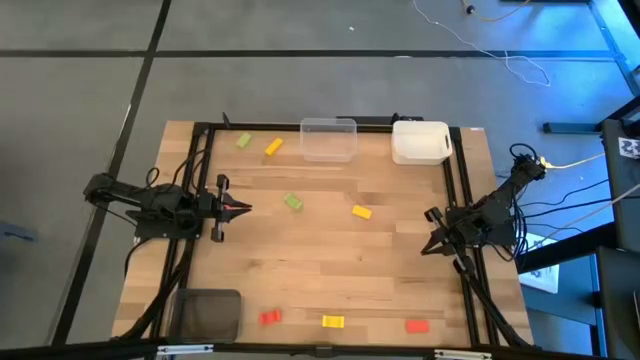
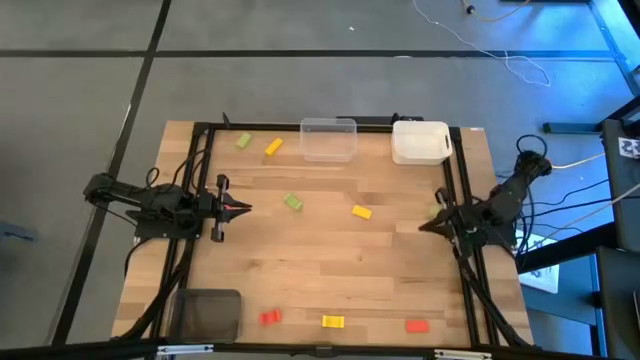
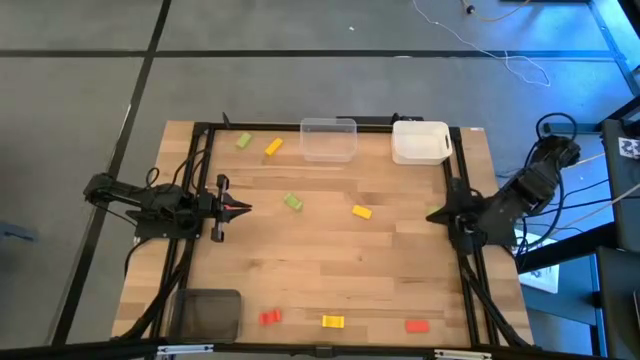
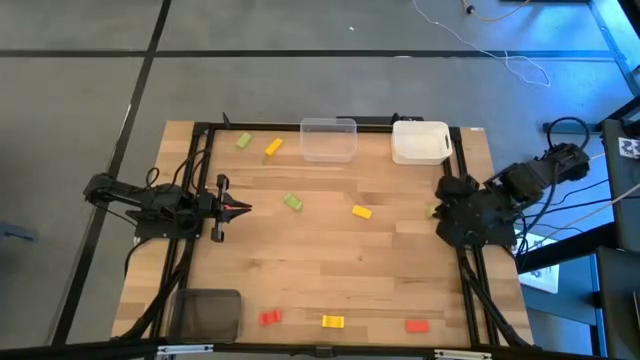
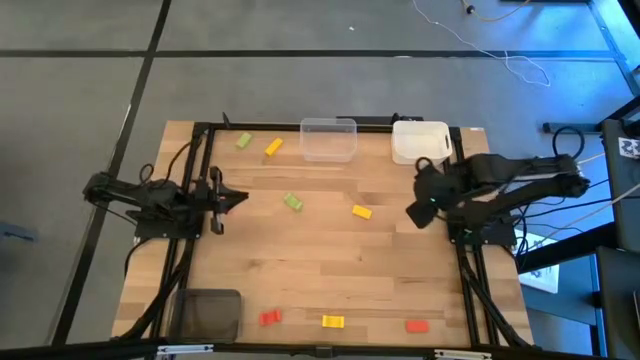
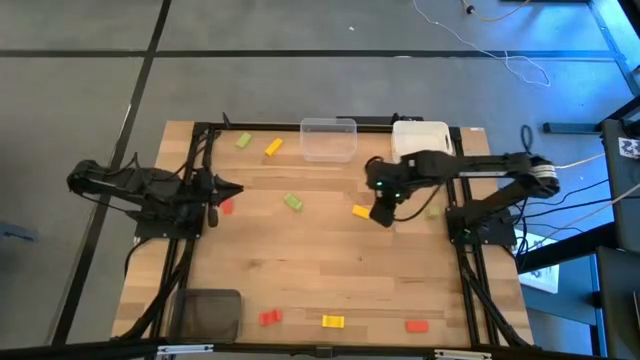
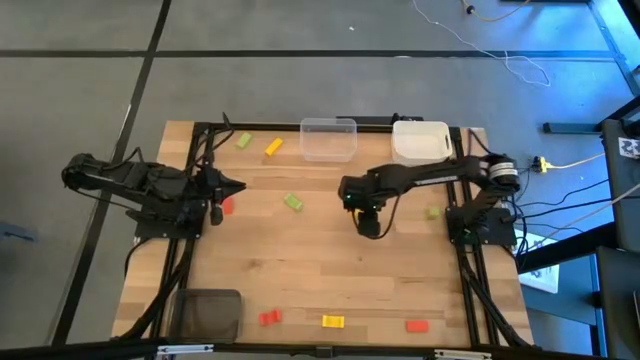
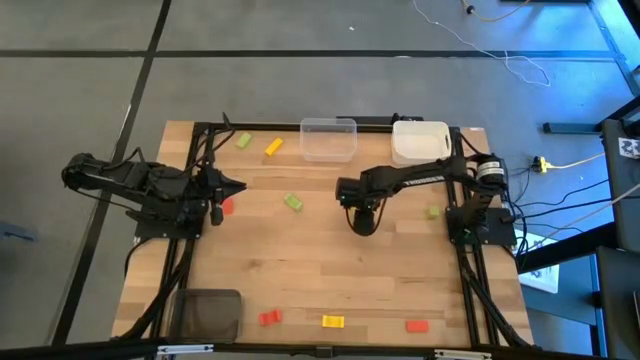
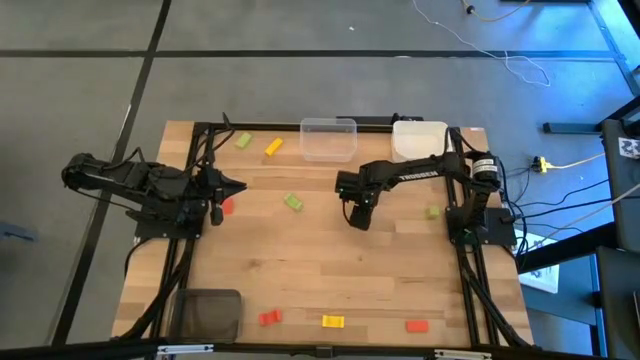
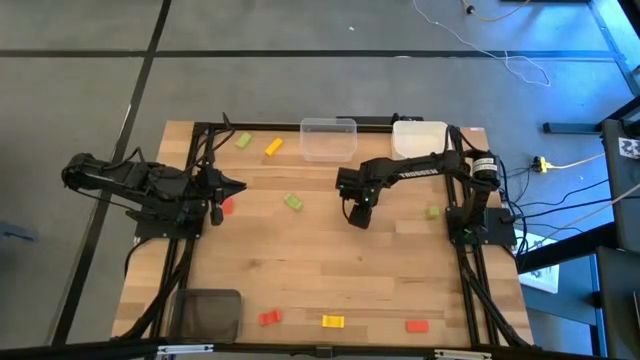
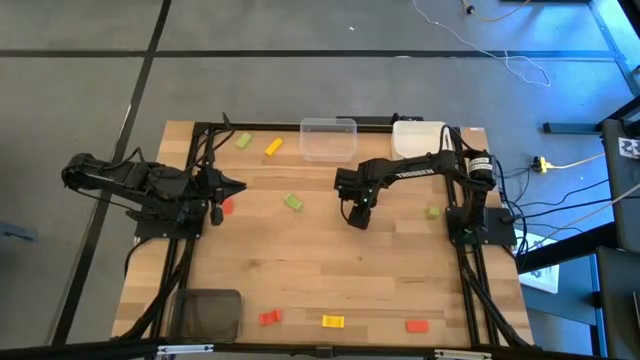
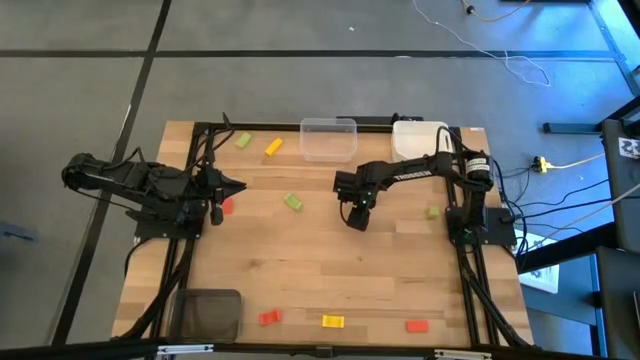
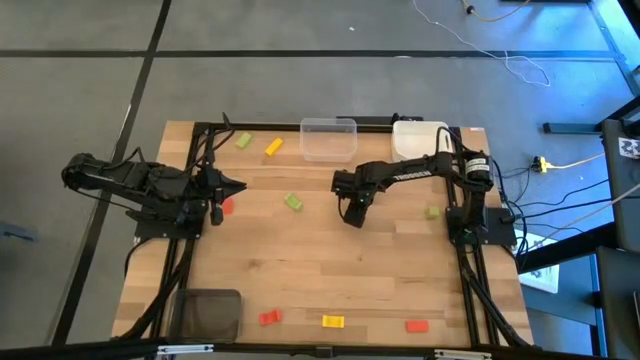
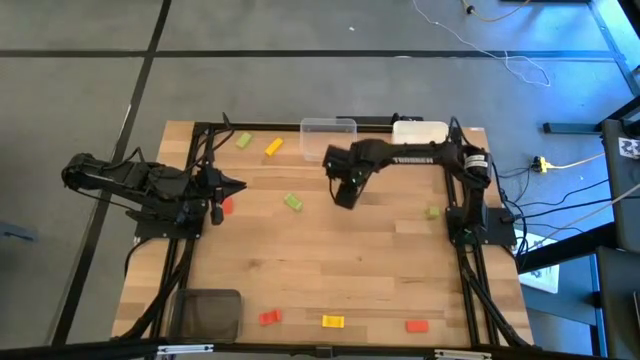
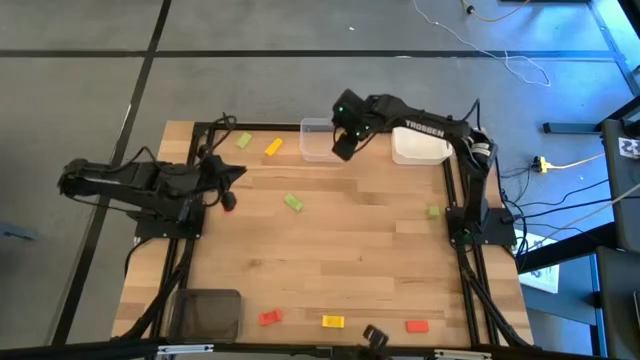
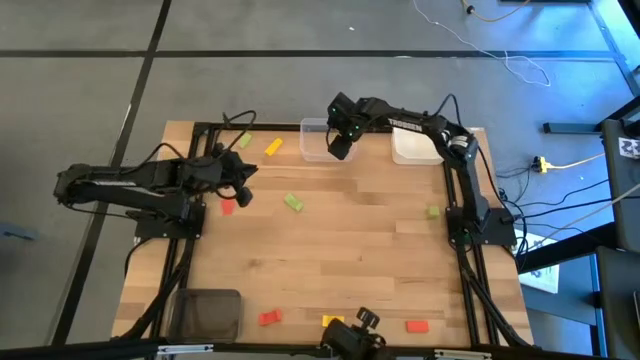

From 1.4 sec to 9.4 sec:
Task: Sort & place blocks by color
Put the middle yellow block into the transparent bin

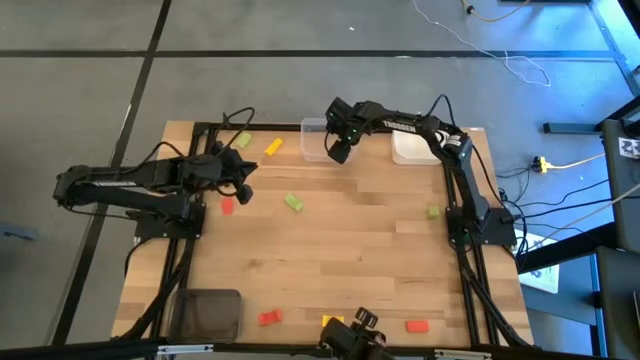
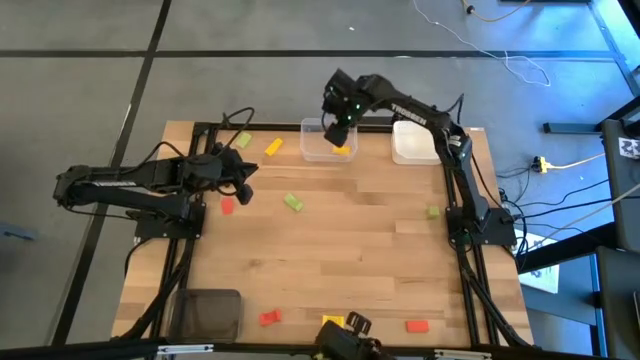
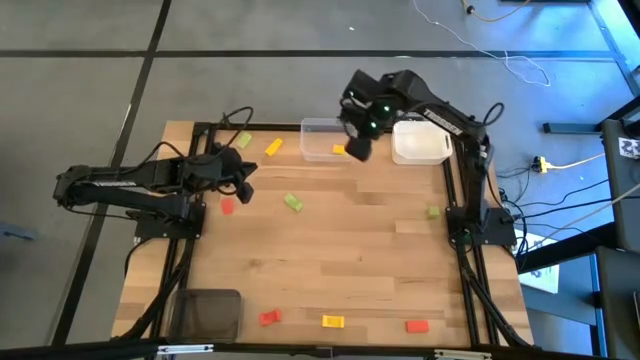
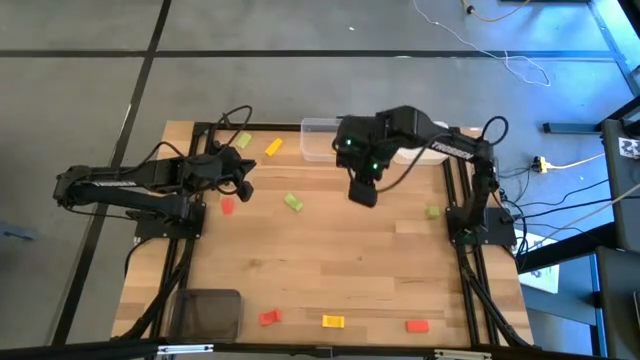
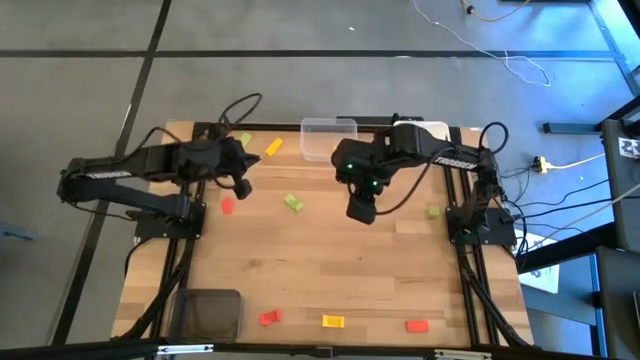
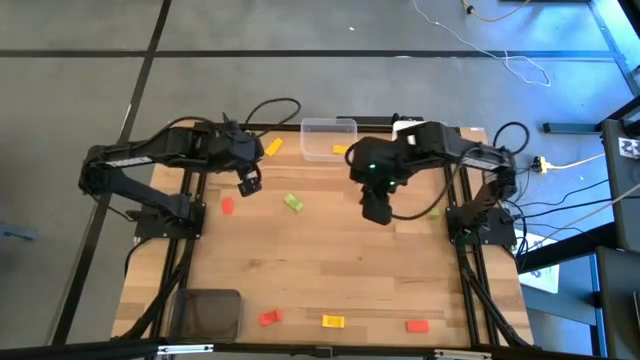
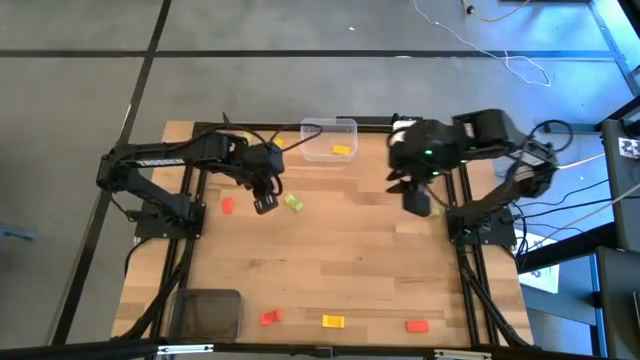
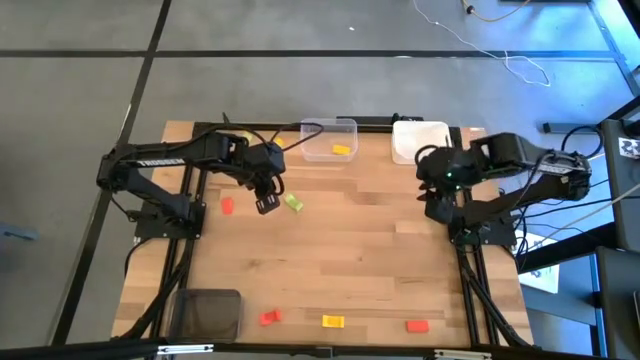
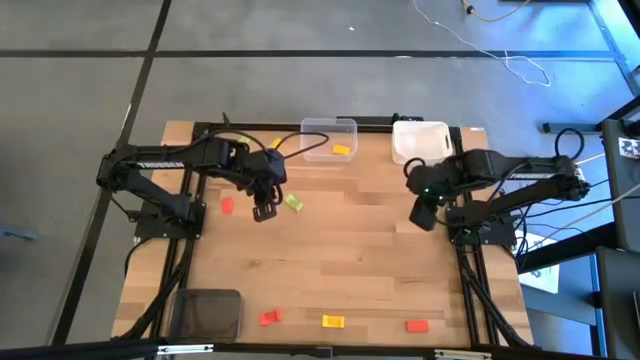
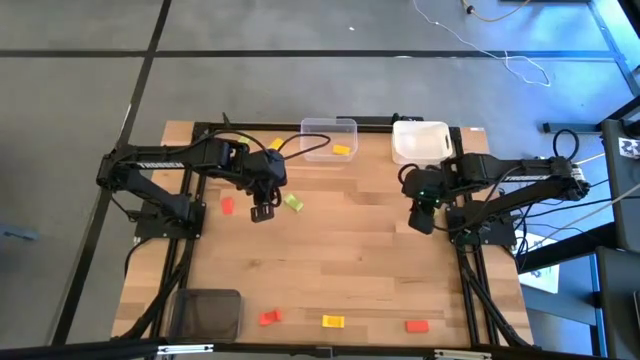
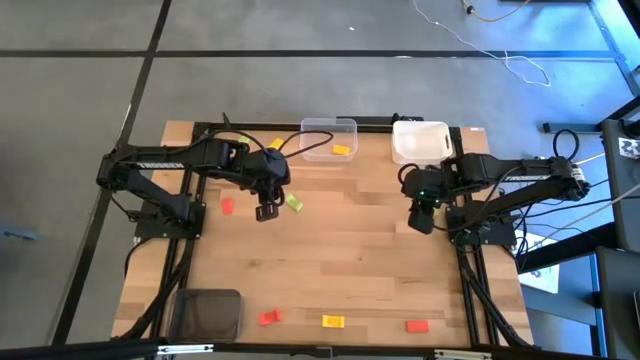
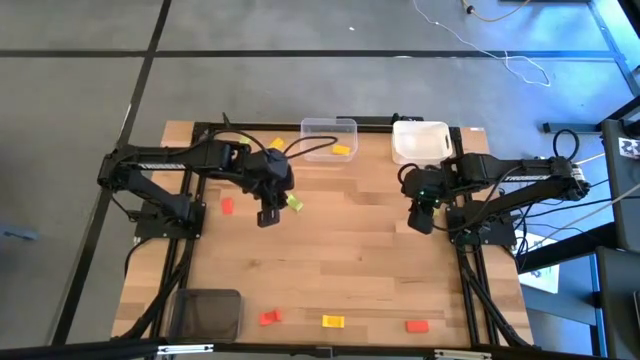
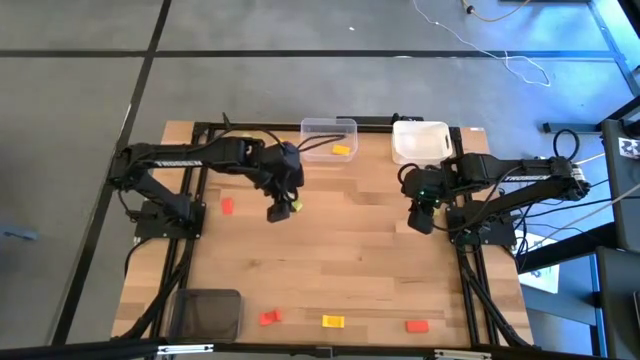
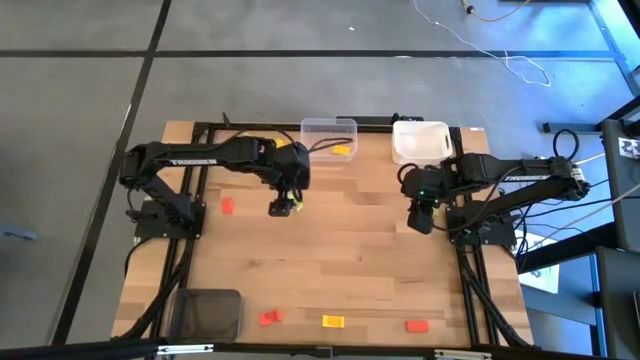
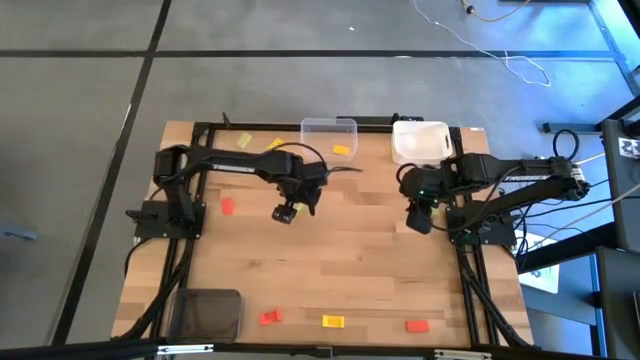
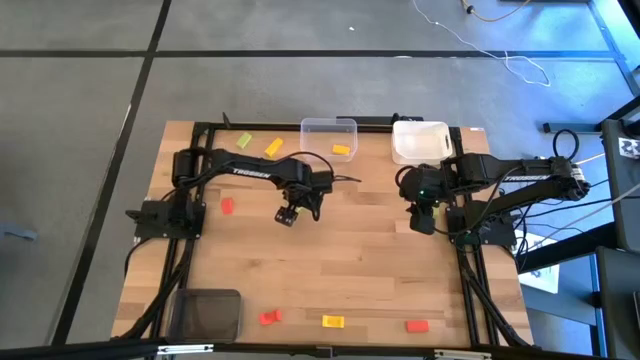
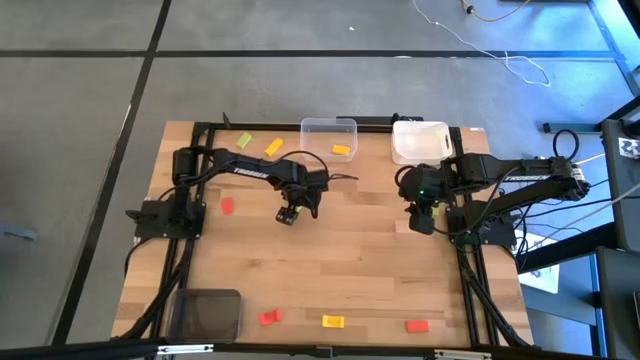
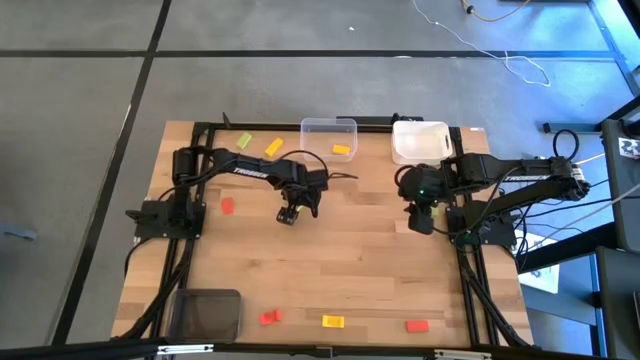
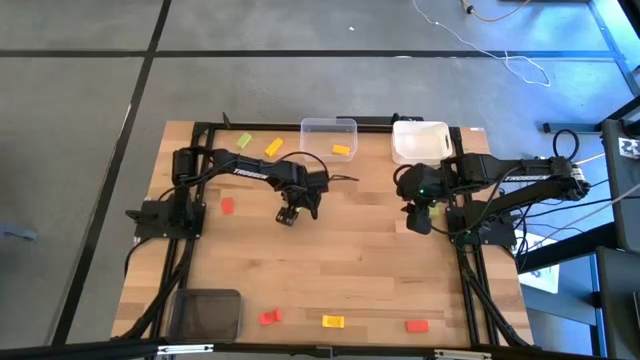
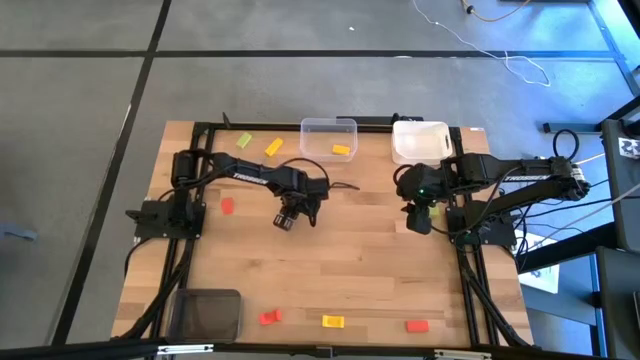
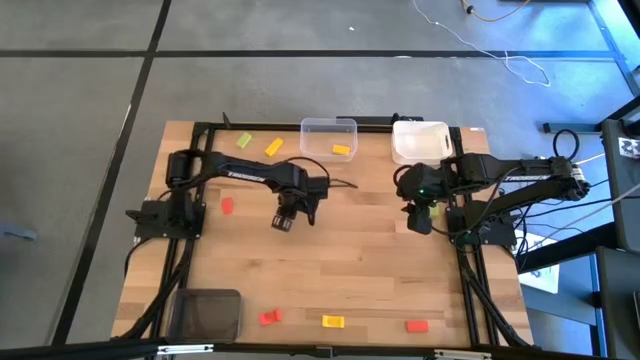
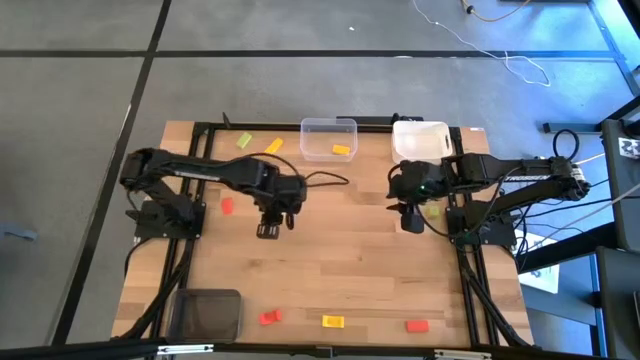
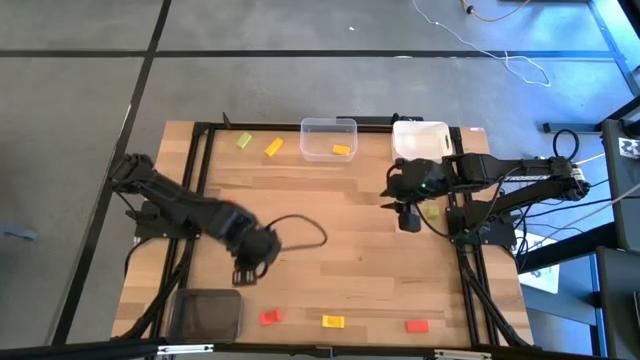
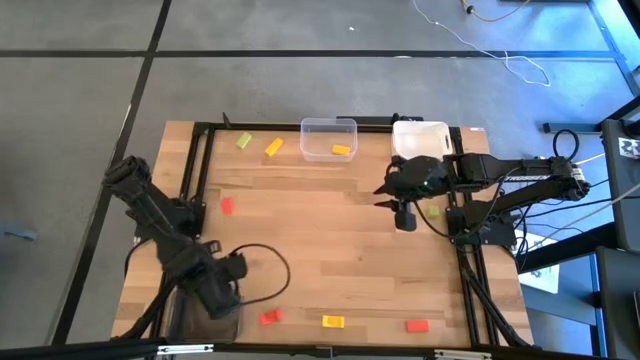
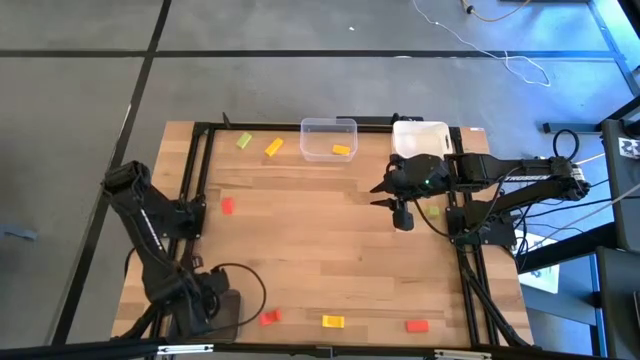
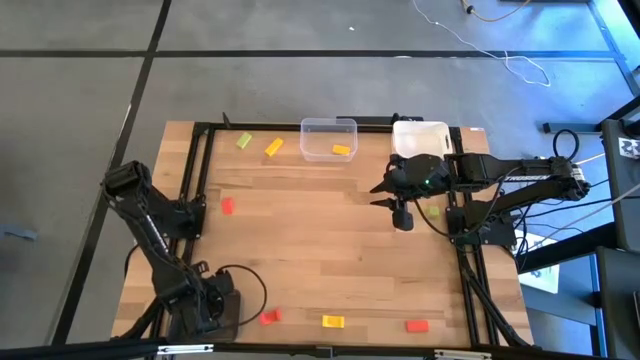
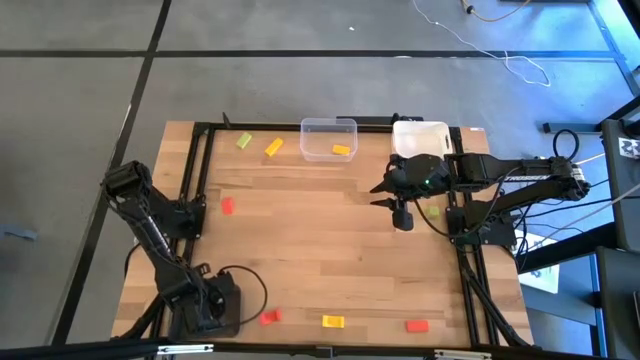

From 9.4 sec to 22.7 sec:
Put the bottom left green block into the black bin
